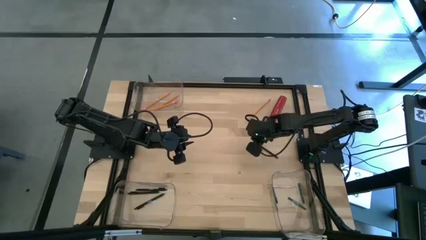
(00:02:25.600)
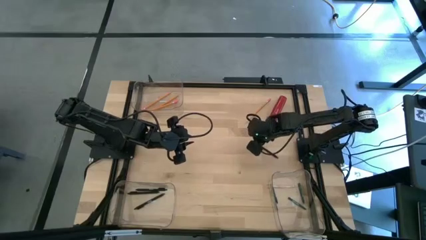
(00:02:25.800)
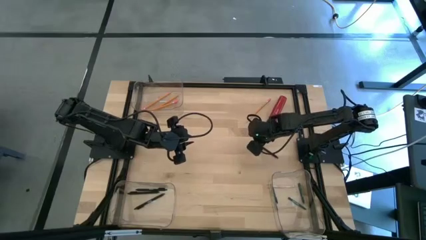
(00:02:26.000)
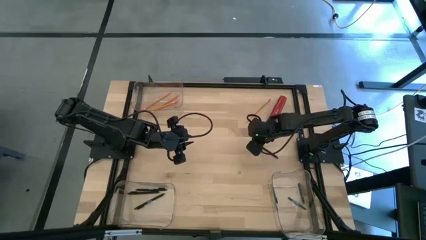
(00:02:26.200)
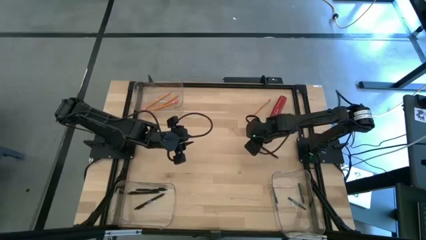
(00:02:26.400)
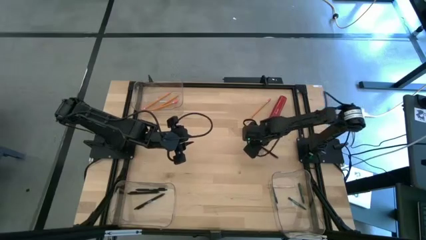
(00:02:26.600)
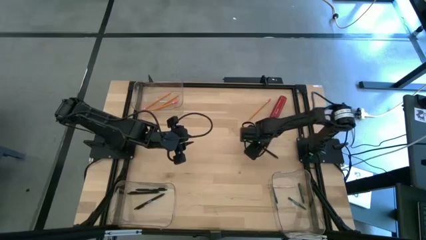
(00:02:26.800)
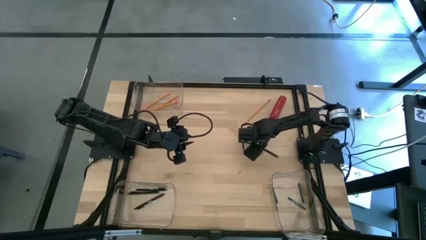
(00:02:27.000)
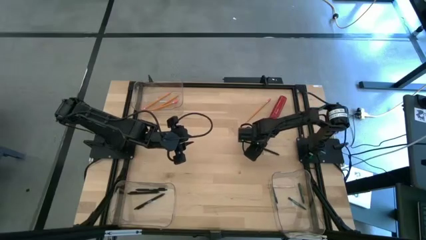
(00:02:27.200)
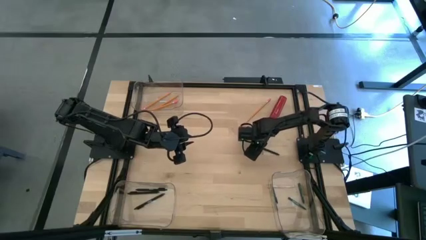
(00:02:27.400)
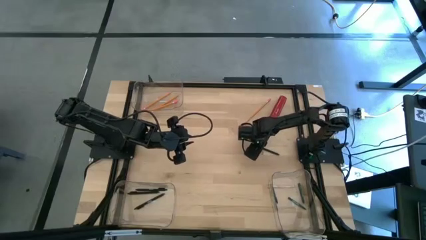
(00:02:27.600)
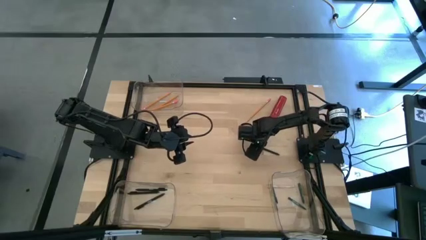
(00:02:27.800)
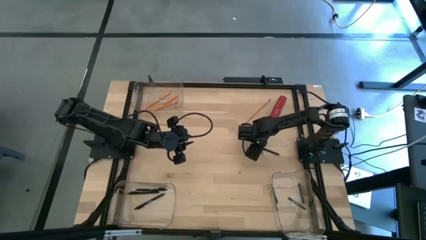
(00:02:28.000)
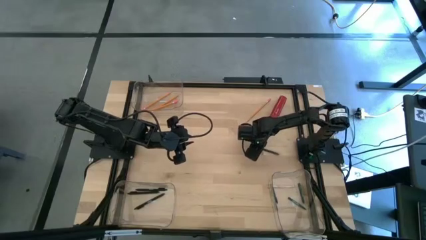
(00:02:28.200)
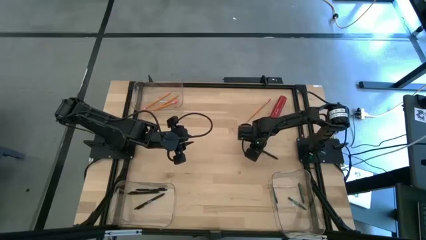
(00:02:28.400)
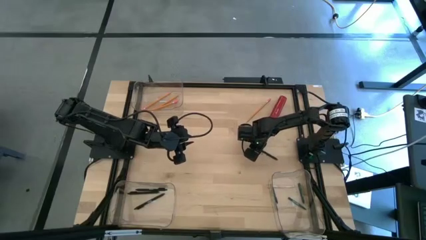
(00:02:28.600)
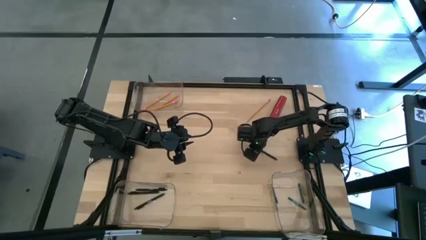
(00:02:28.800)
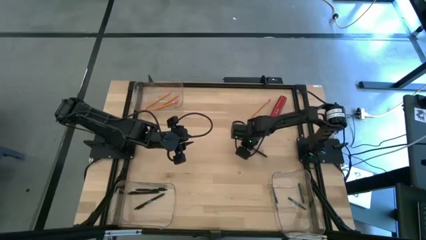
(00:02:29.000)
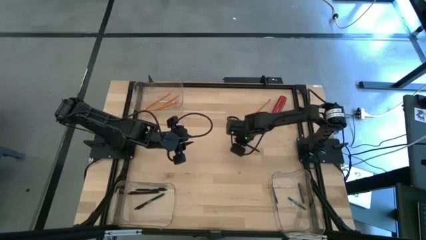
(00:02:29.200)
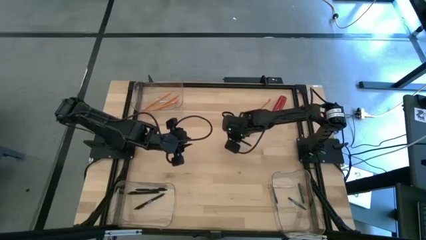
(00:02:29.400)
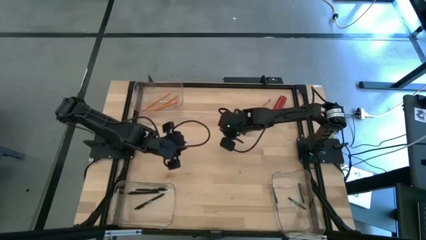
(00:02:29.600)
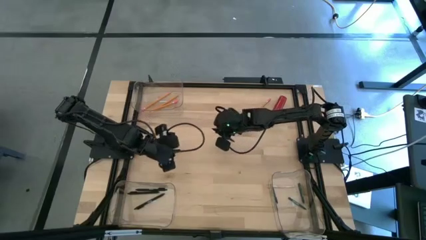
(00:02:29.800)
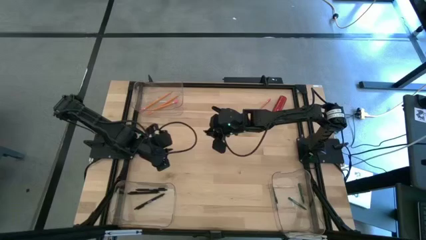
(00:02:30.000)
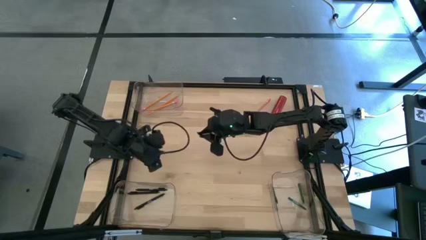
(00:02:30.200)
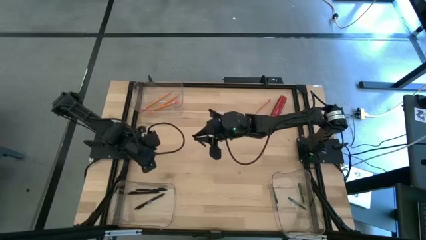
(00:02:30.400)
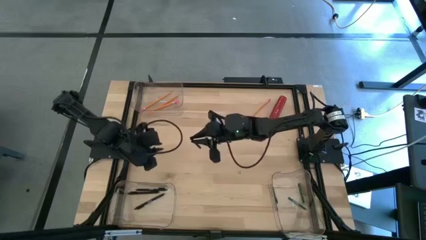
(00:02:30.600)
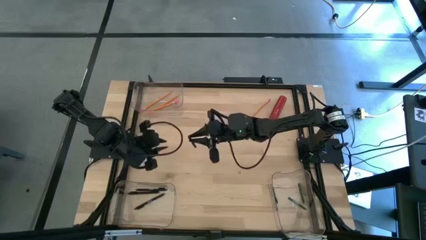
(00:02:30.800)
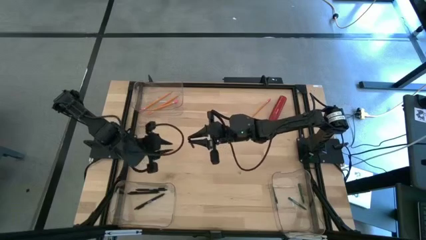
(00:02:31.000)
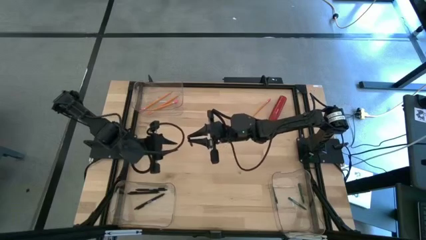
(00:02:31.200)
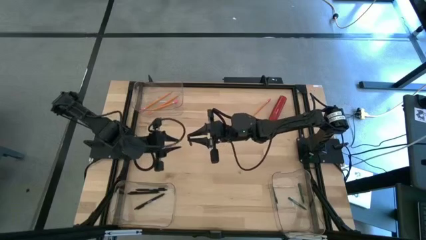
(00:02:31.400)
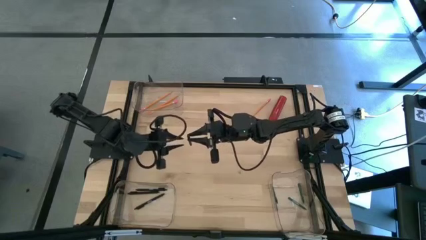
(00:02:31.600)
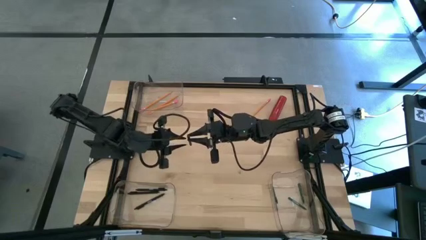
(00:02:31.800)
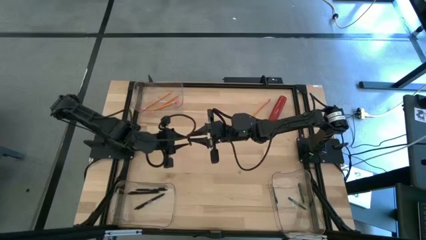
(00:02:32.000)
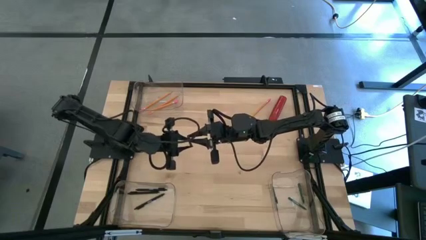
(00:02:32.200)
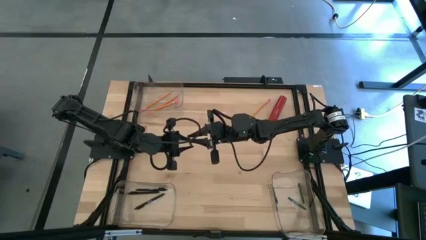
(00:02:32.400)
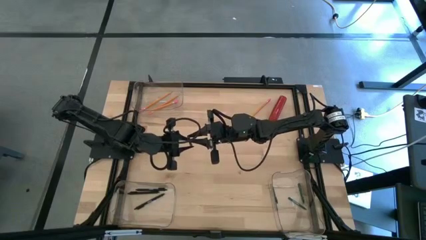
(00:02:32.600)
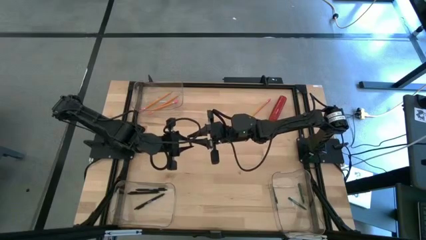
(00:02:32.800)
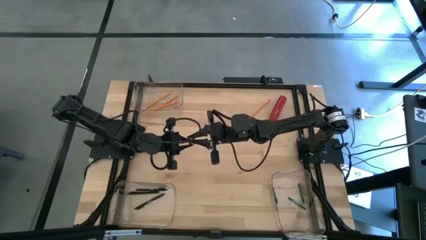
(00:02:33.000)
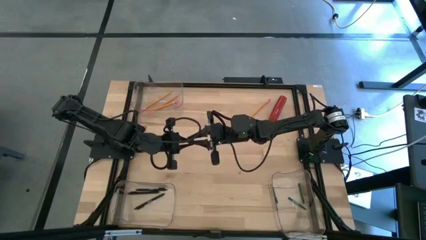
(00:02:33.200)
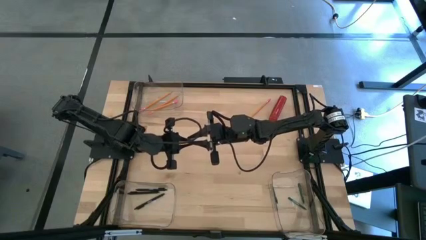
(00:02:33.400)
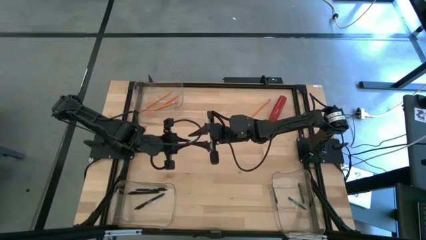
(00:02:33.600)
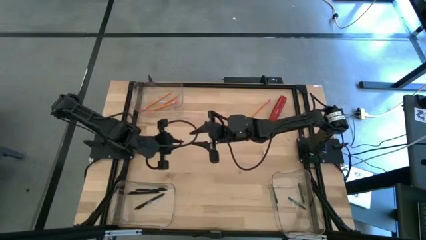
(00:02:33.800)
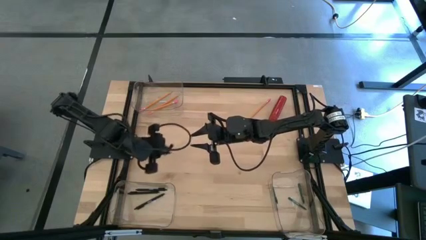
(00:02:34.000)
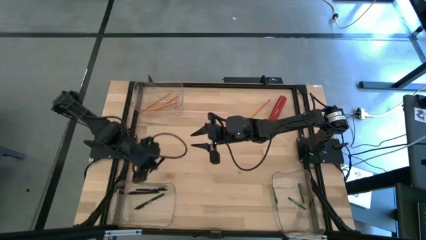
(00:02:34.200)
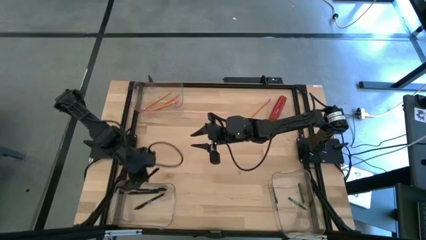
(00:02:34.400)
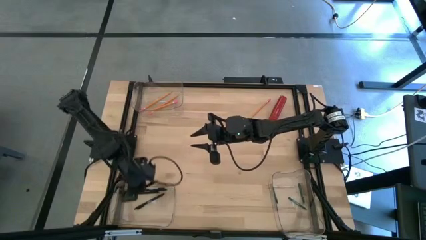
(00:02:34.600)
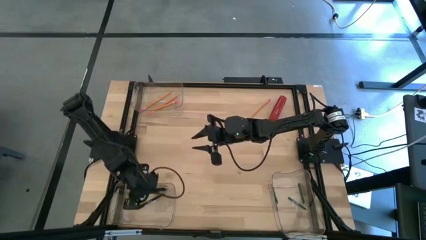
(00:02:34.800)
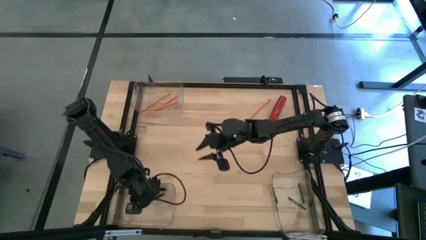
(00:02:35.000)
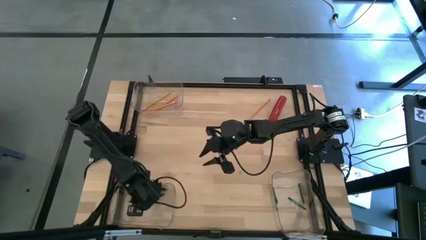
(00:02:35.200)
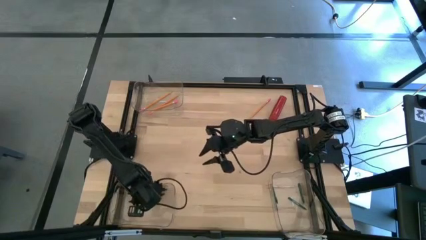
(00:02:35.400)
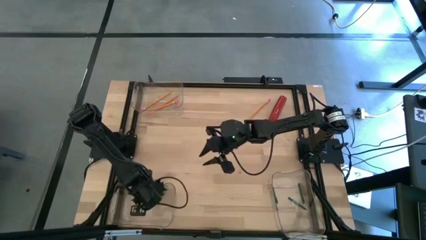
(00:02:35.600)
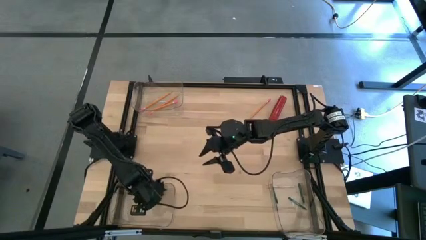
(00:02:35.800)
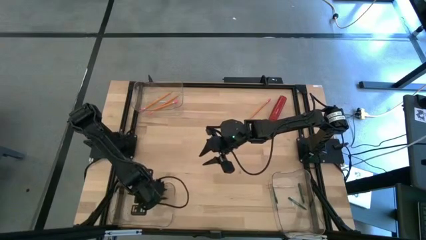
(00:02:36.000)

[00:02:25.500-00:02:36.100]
Task: Sort crayons/erasers/pens/pencils in bins
Put the black pen into the bottom left transparent bin

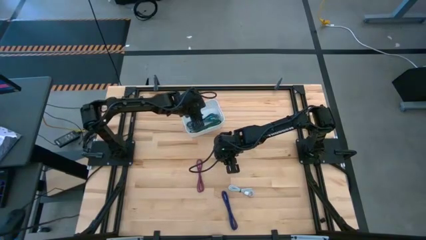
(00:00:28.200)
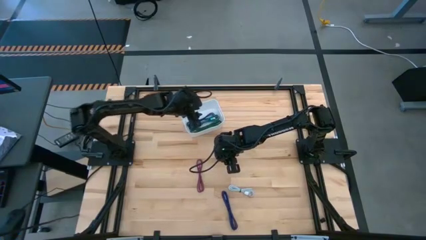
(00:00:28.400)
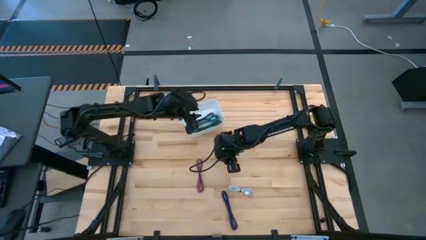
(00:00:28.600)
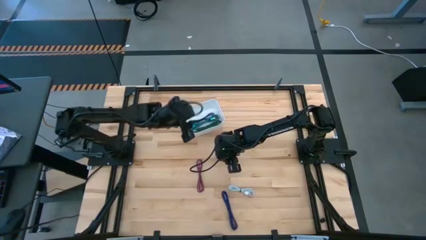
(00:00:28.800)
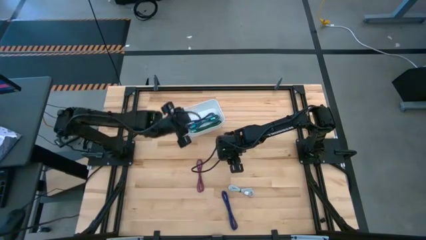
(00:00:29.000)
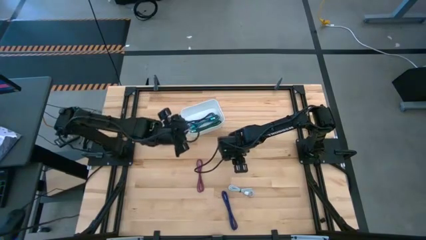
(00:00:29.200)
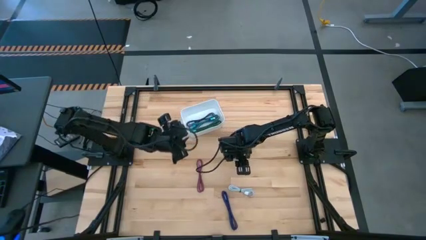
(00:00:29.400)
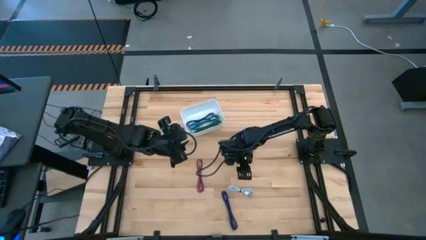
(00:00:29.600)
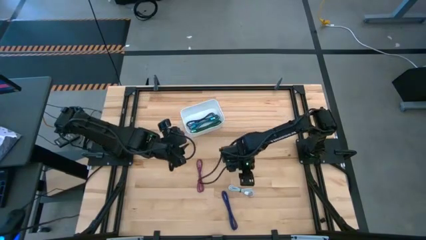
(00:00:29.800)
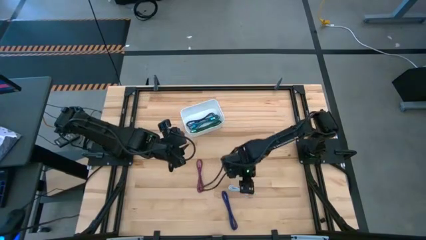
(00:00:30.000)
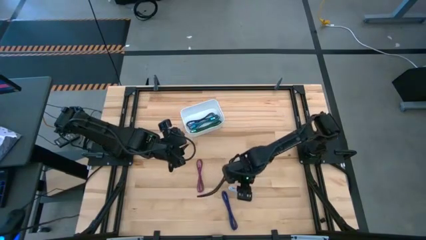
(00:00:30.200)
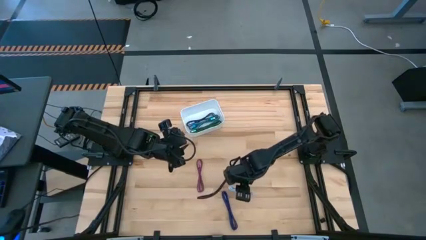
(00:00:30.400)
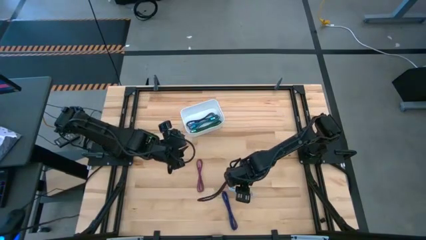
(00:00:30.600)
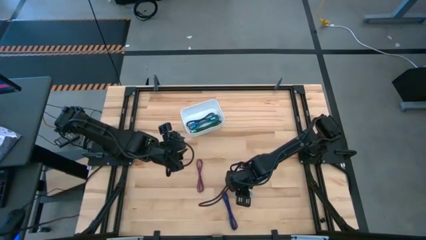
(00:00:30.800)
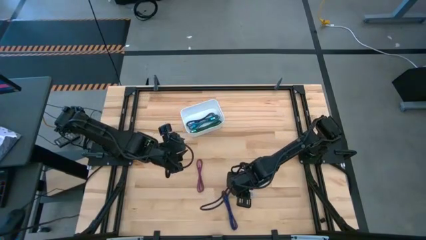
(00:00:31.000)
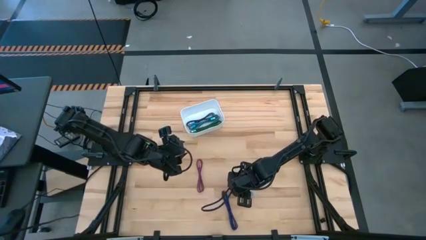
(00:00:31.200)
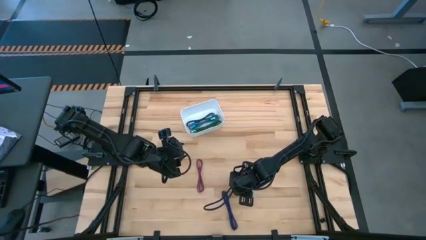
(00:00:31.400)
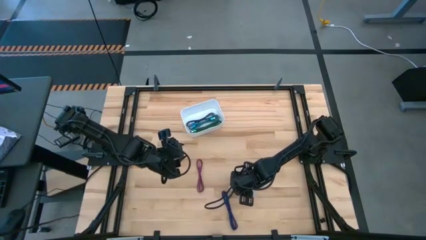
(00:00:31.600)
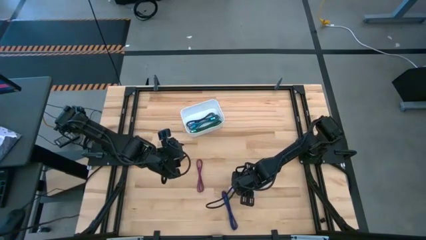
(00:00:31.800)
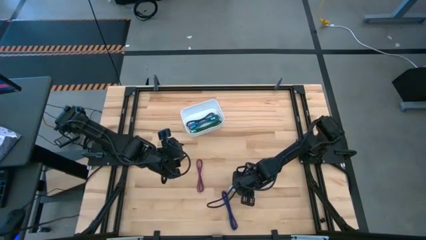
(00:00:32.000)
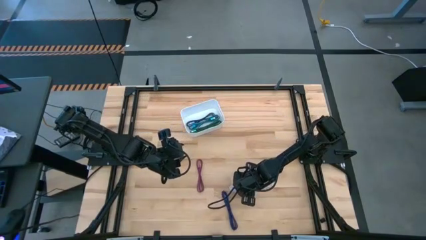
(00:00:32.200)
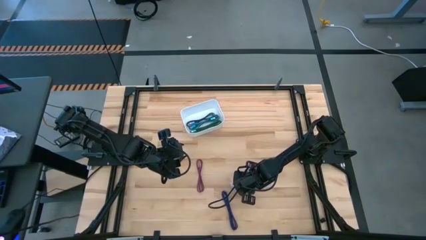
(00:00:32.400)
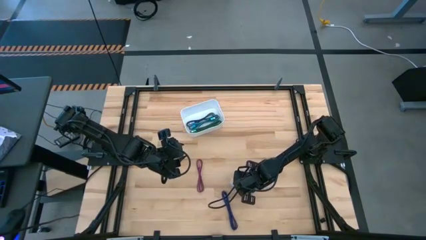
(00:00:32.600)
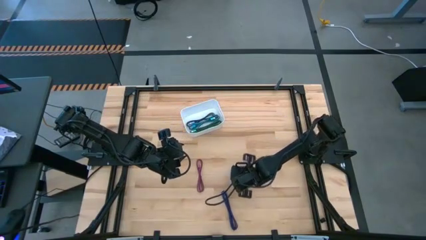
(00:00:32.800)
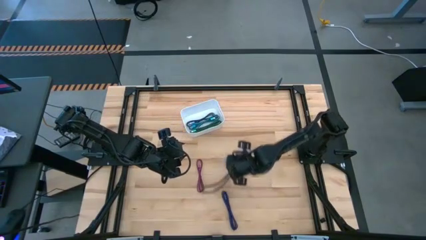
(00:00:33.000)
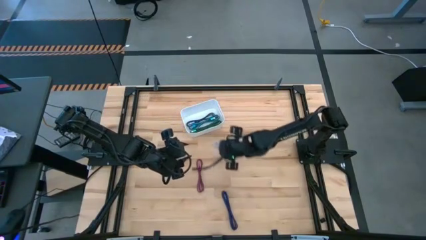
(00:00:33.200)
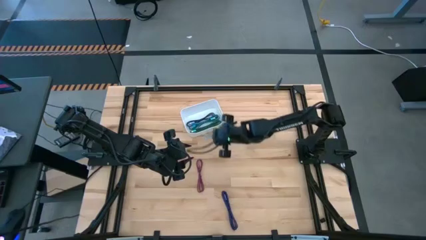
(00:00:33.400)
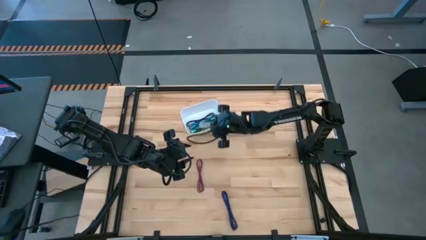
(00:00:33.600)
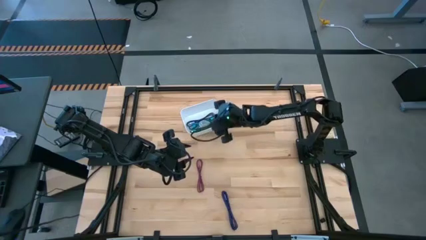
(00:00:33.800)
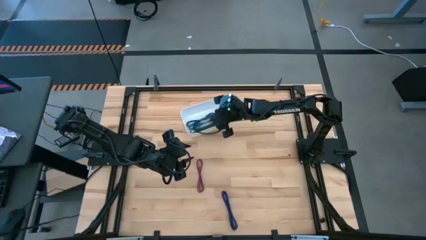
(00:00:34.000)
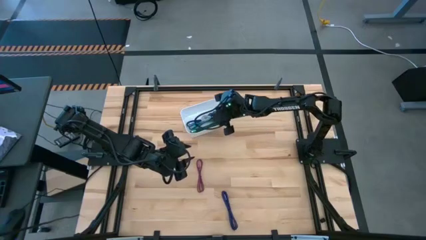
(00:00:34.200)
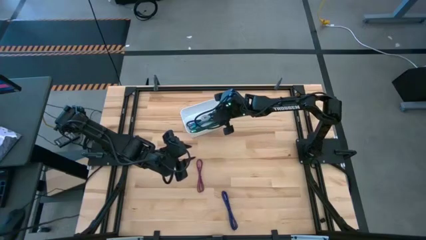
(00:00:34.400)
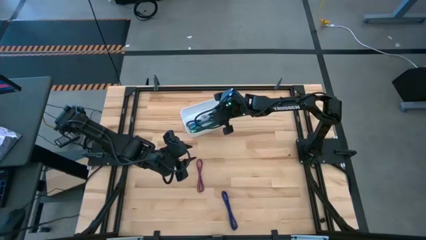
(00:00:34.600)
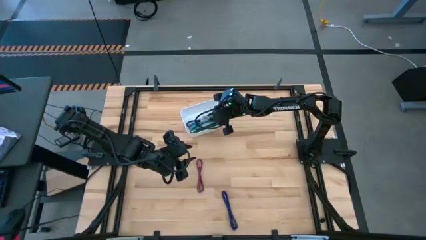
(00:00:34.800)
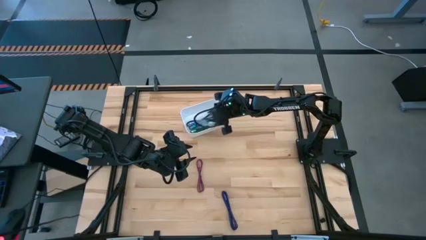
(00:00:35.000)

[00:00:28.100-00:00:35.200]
Task: Pick and place USB-C Cables
Put the white charger cable into the white bin
